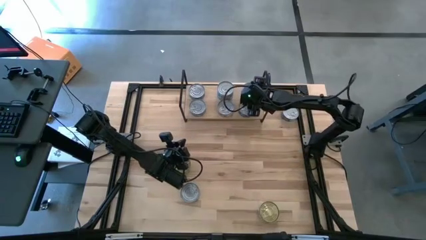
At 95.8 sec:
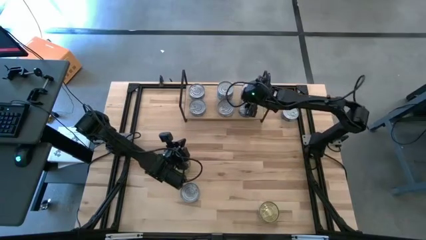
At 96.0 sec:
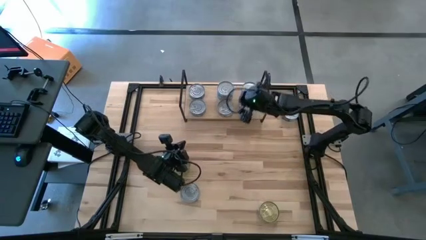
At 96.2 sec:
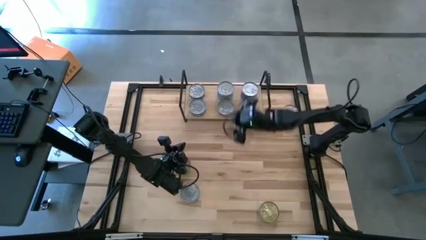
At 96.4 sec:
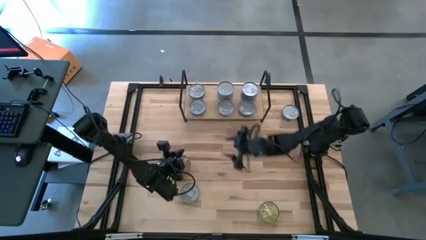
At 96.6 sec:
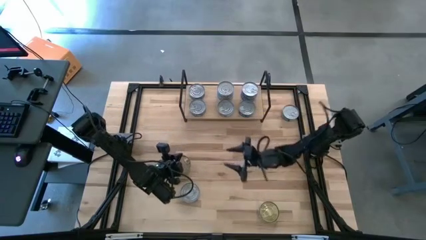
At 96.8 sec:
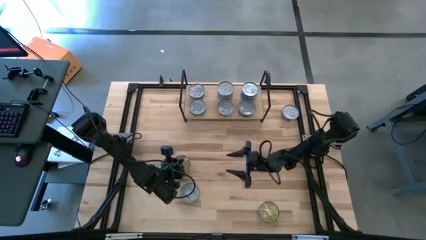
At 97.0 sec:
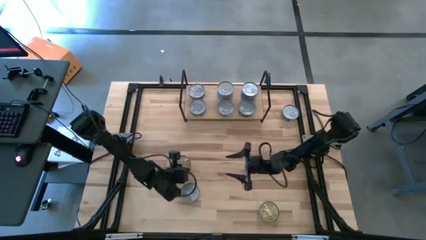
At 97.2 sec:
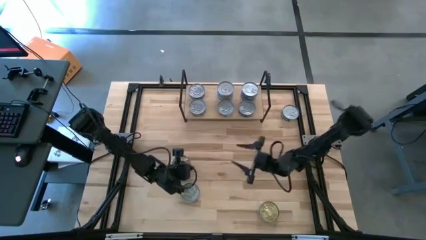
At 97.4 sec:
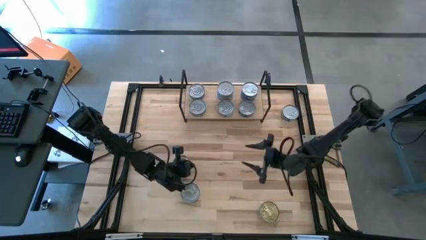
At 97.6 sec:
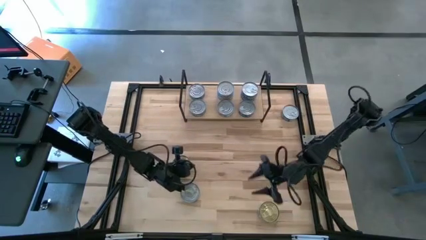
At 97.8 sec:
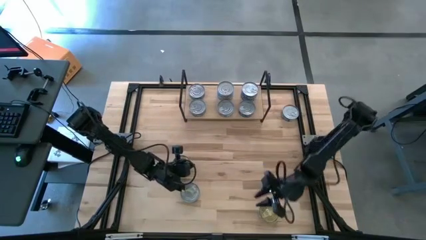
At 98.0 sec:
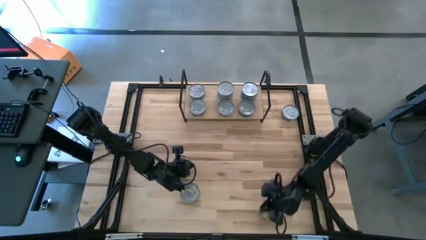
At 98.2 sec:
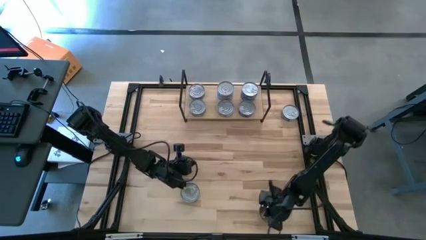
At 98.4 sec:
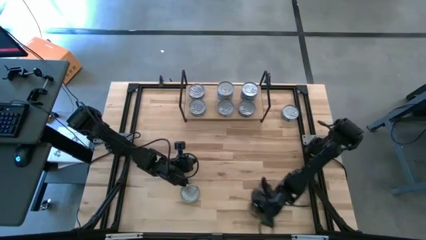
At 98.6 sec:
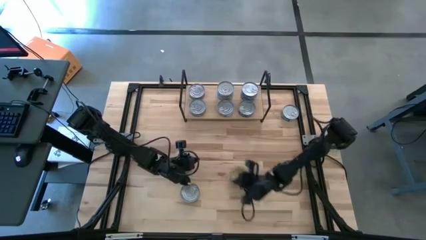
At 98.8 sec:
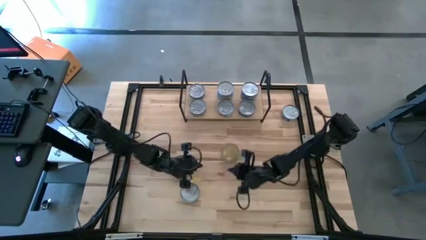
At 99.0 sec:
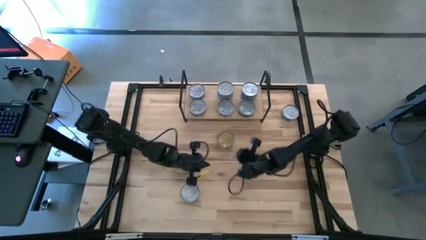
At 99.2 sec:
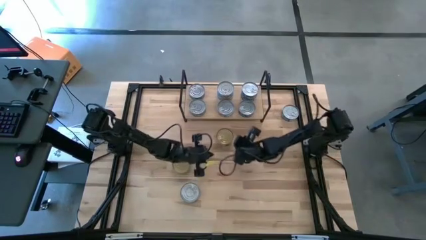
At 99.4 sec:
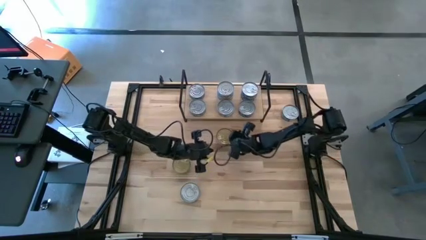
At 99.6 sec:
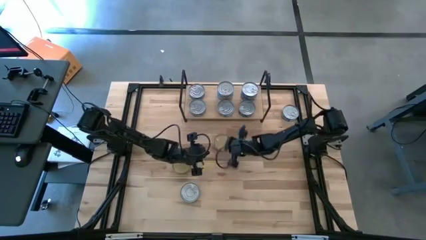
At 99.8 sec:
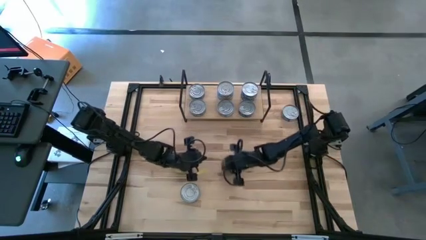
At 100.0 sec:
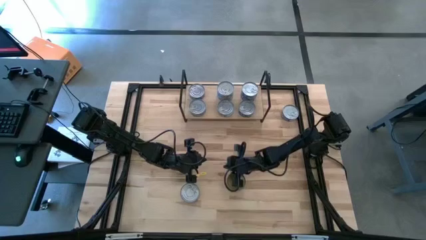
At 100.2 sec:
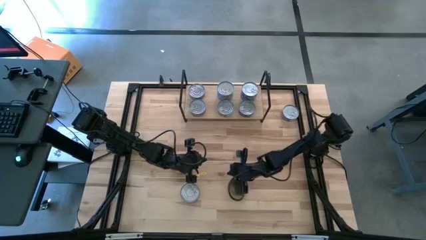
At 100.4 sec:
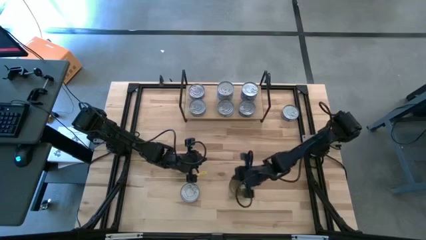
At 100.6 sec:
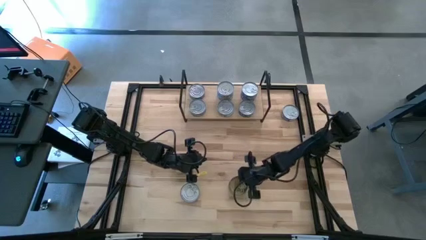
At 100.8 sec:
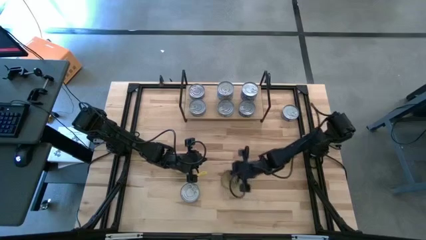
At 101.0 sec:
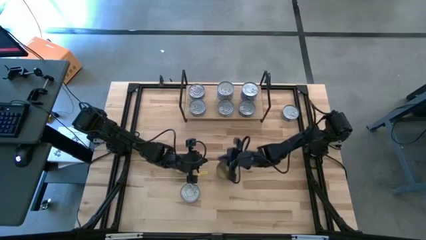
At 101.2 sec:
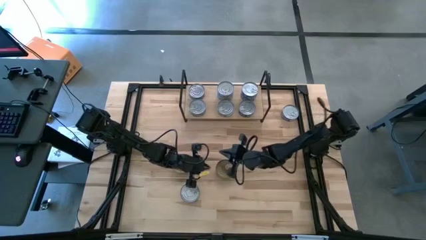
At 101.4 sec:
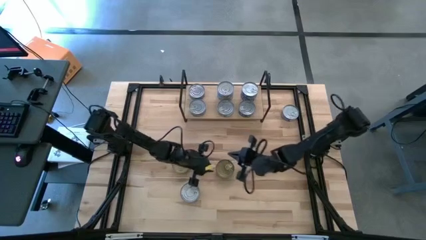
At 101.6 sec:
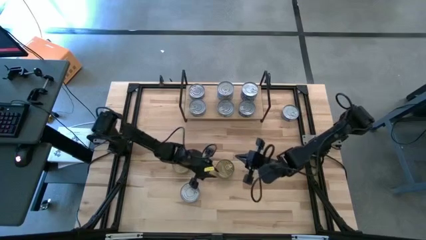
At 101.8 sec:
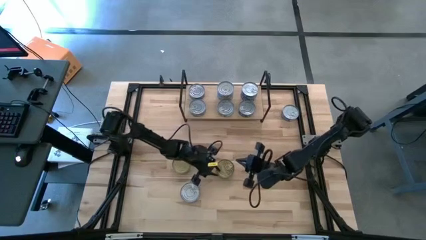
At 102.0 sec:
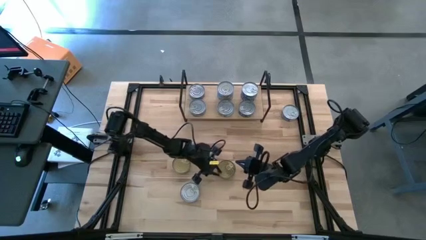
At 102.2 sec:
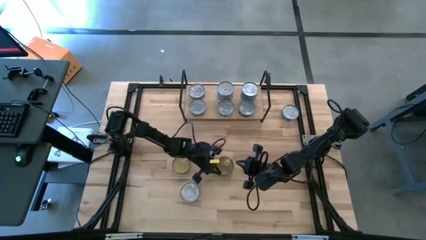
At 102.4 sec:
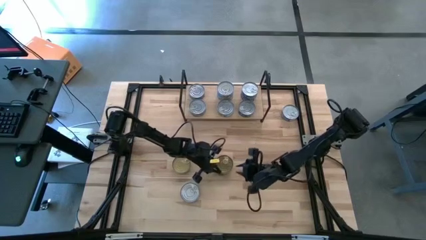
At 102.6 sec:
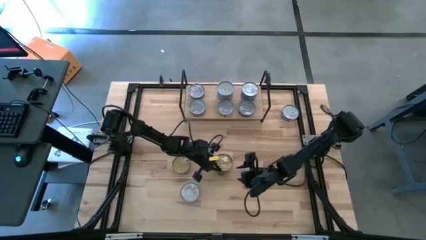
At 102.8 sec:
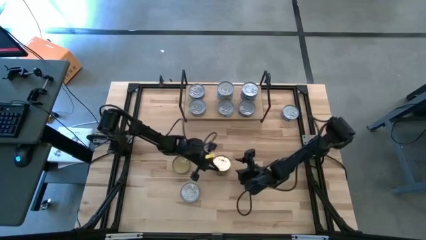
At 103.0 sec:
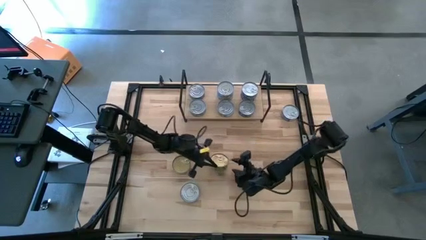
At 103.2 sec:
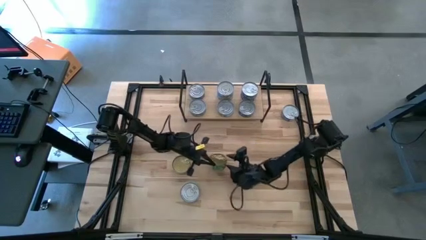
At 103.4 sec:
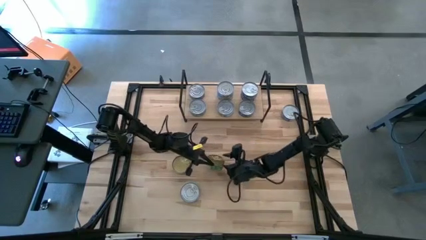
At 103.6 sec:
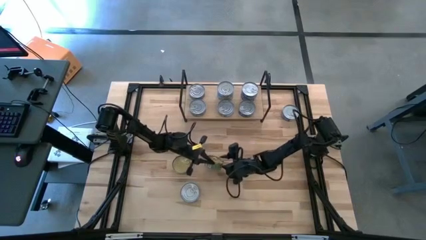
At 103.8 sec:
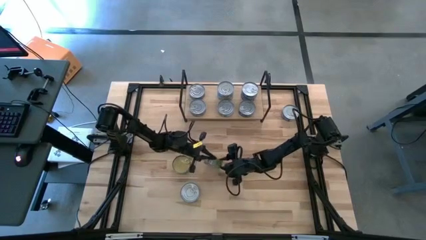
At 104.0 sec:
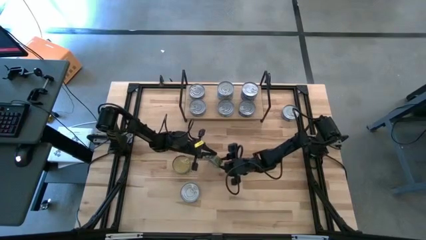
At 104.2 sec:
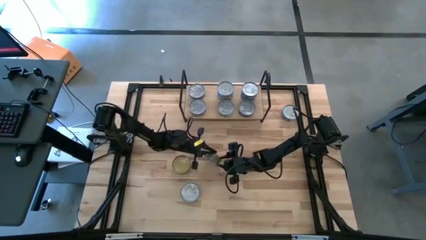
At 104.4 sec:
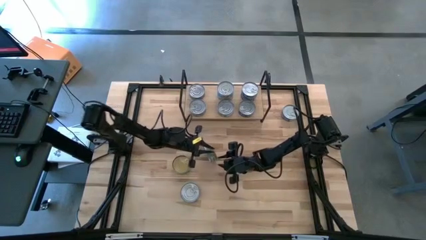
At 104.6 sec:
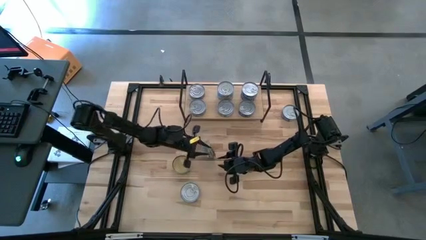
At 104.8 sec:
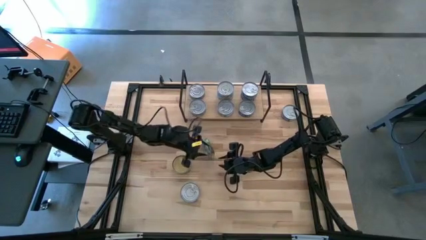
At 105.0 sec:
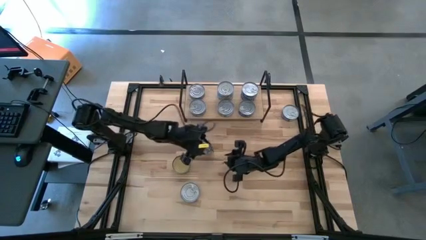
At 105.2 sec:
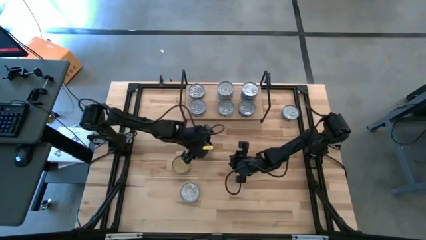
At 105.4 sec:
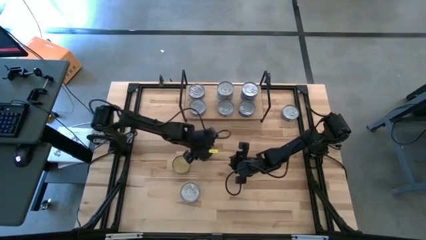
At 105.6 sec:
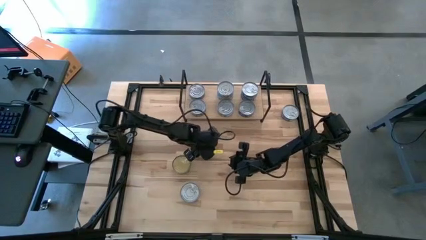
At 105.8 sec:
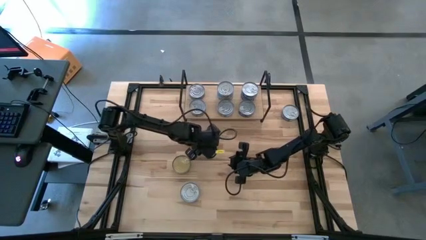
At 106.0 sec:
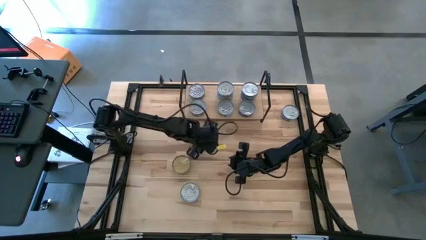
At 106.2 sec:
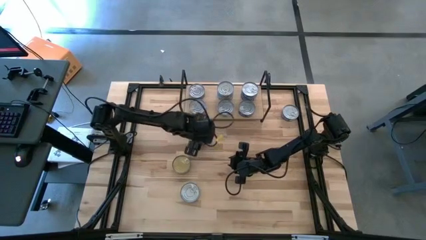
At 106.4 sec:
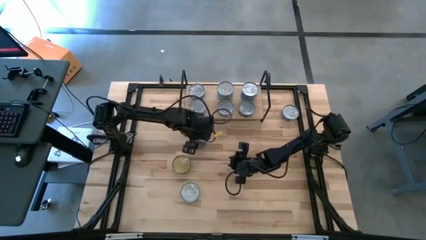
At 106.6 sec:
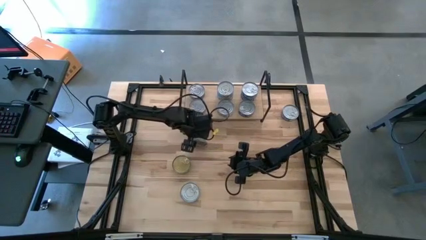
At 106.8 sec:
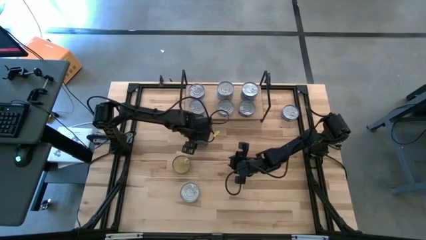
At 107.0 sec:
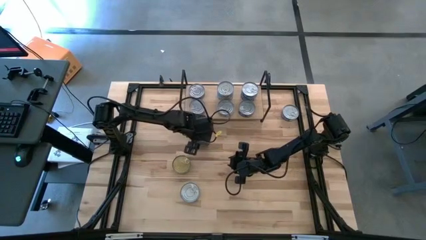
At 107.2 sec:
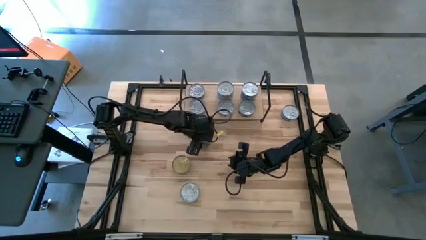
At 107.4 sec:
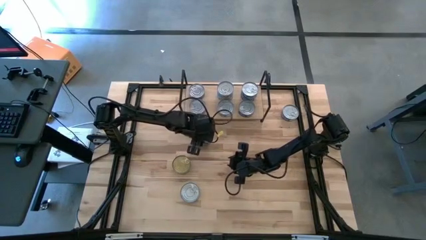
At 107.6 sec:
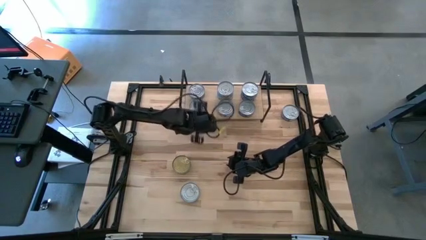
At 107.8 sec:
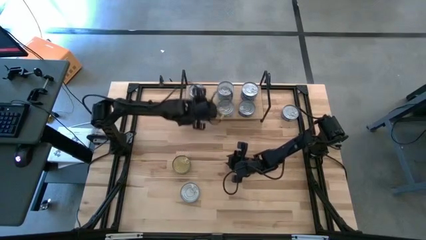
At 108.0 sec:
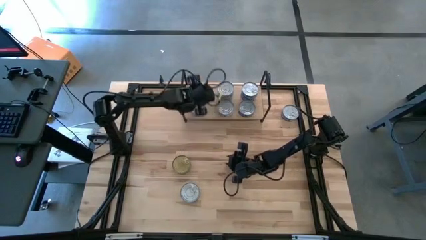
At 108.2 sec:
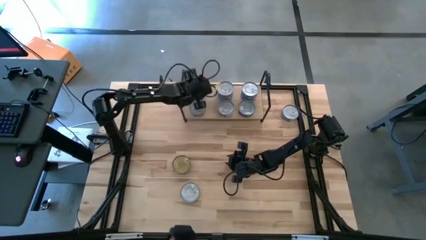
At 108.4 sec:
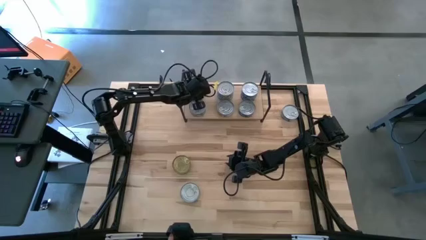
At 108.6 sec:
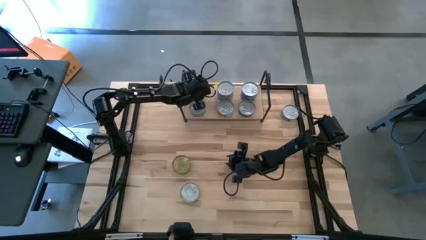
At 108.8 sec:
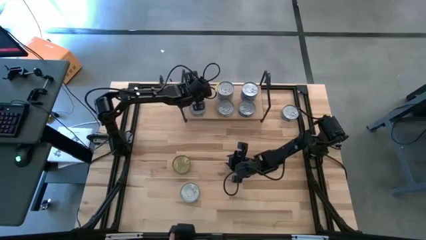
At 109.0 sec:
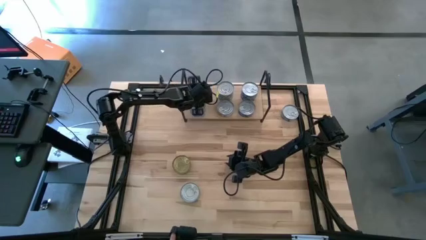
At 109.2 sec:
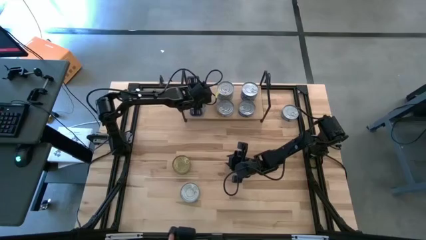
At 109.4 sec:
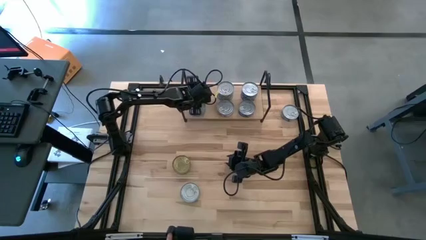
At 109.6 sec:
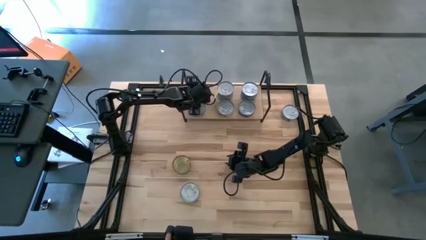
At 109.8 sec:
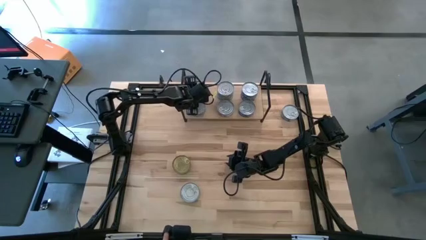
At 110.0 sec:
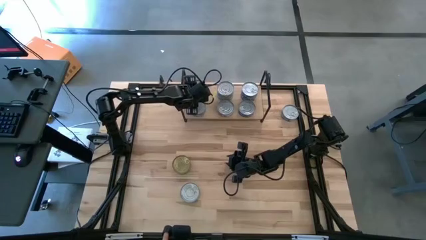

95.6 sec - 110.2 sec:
Task: Stack canned seafood by type on shelf
Stack the green tuna can on top of the other green tuna can on the shelf

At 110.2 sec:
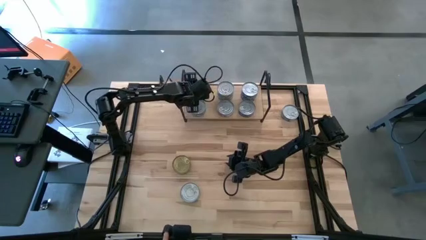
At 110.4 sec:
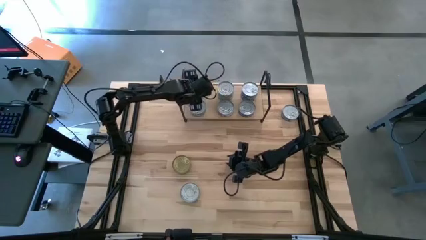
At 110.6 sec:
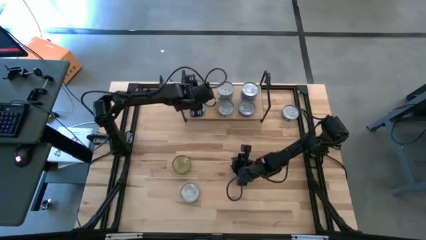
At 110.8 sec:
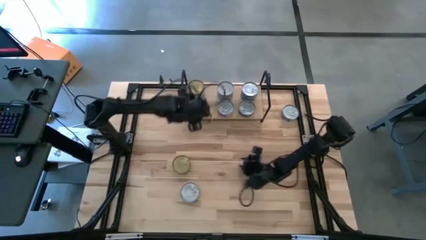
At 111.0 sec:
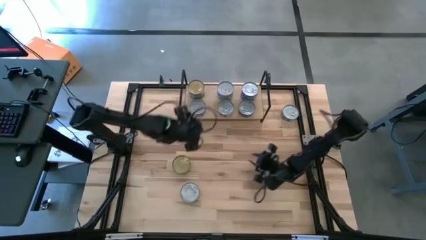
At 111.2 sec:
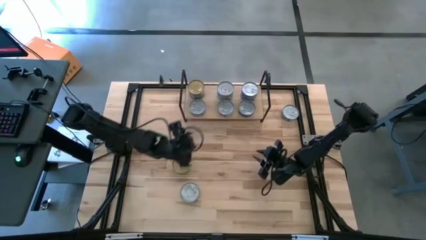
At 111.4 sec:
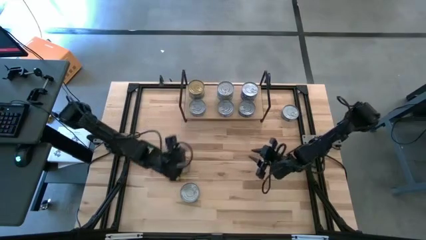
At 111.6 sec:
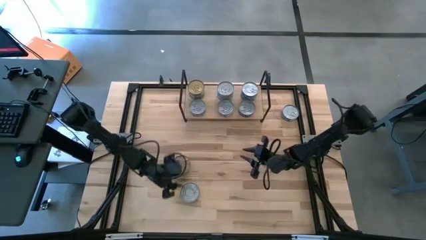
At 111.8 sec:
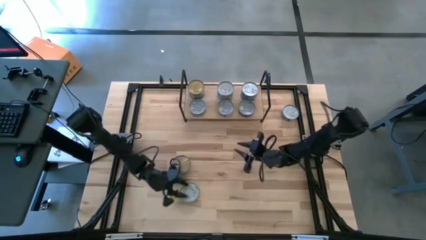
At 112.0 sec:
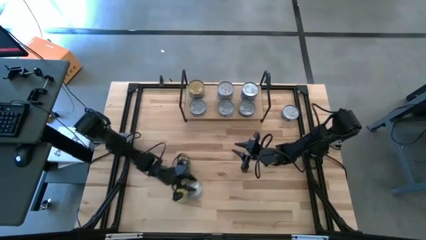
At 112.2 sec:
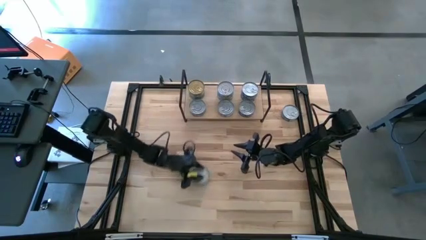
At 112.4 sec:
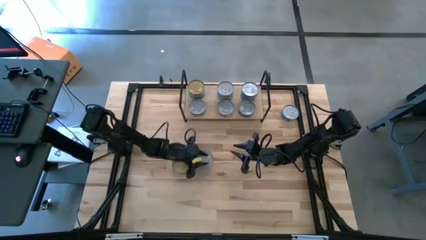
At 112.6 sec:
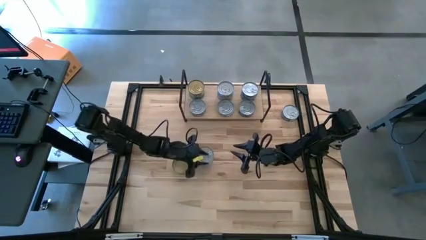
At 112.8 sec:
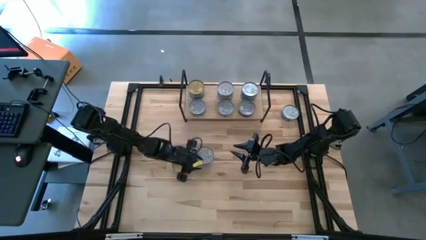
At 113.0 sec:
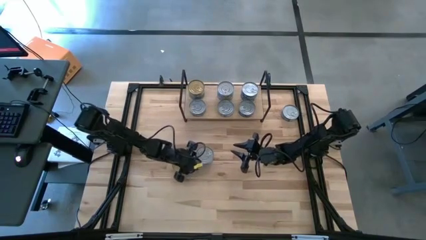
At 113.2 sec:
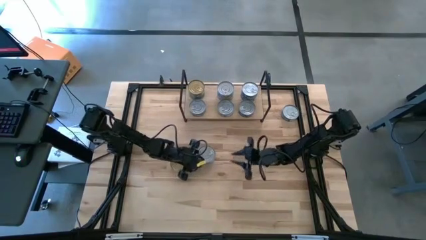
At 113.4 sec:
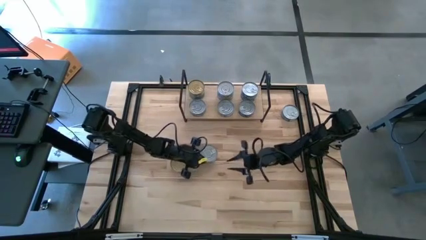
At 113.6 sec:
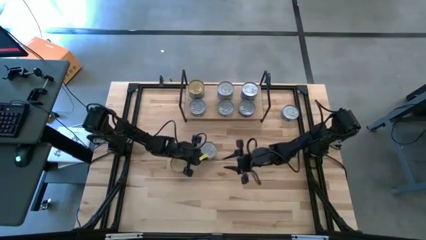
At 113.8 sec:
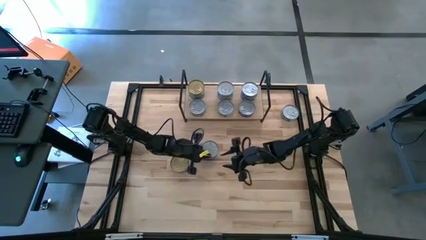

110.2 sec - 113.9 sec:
Stack the yellow and blue tuna can on top of the other yellow and blue tuna can on the shelf
